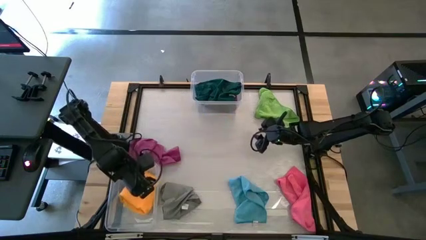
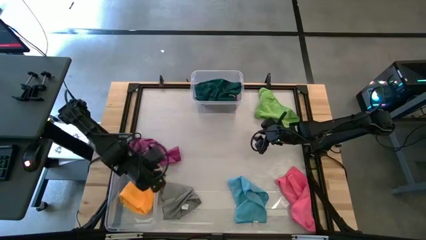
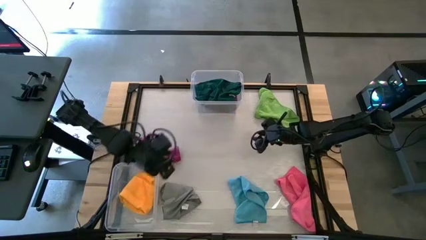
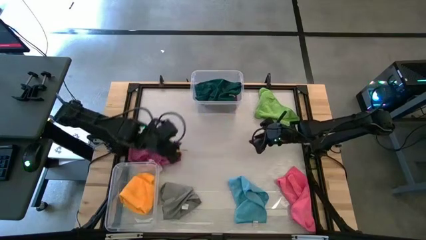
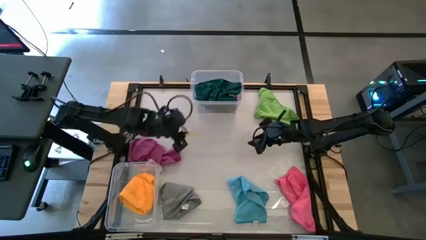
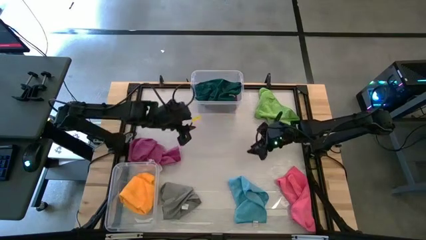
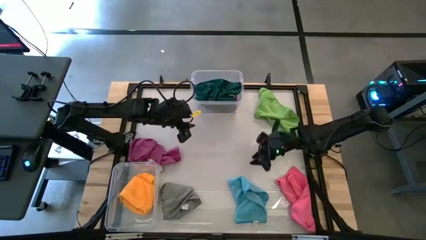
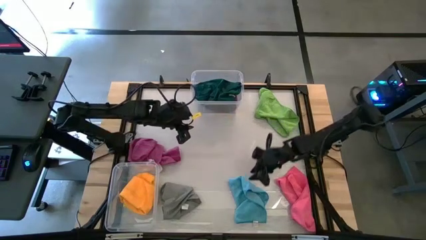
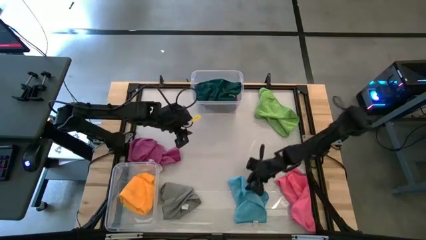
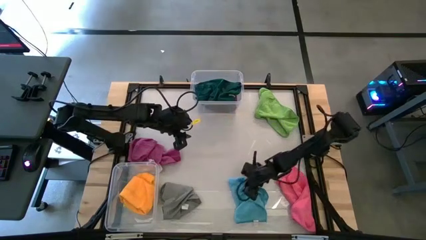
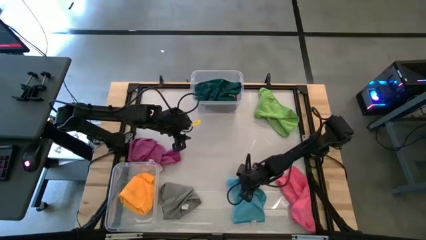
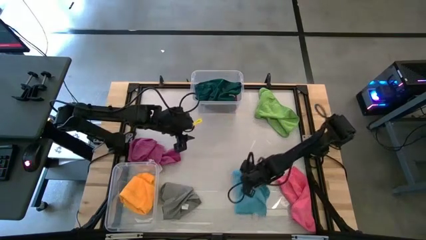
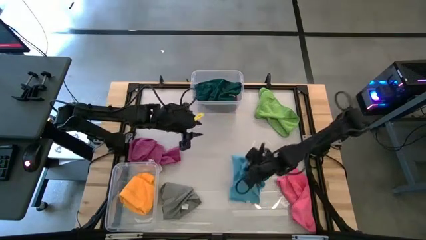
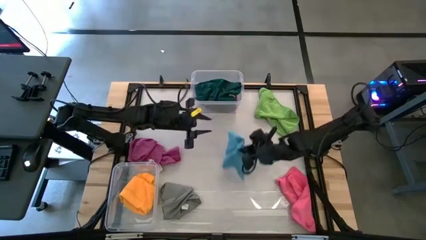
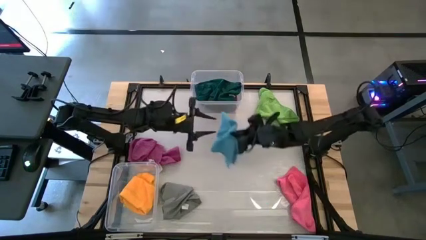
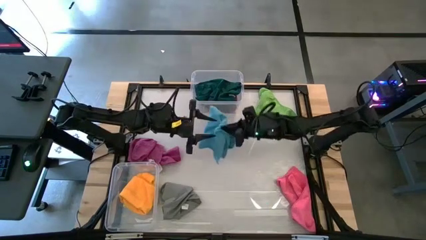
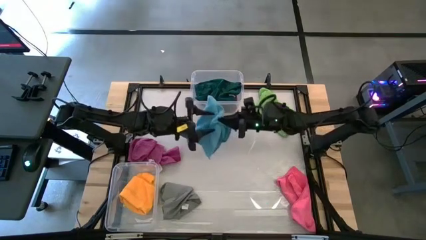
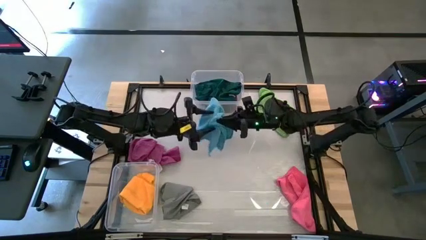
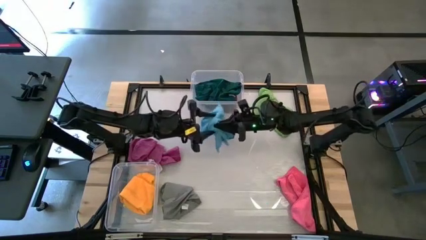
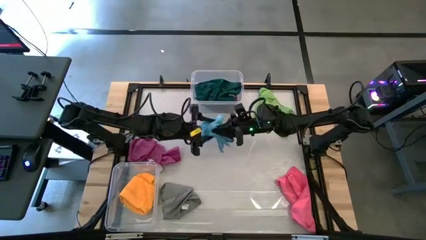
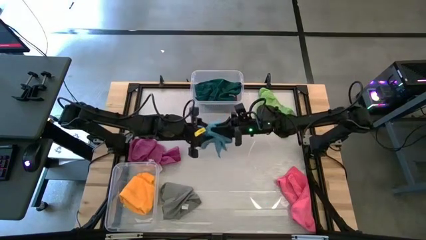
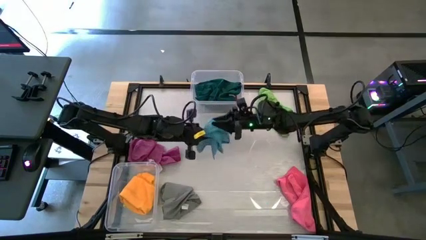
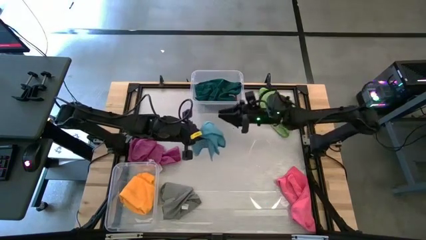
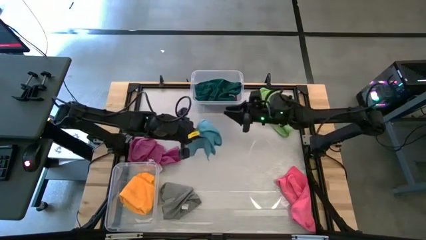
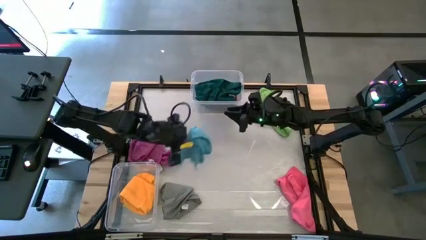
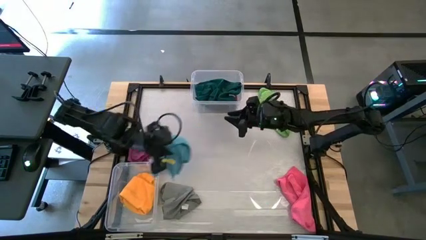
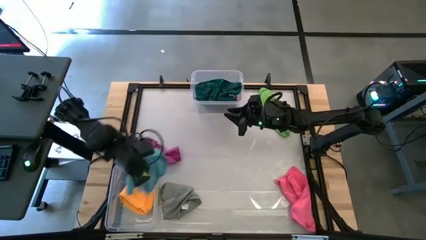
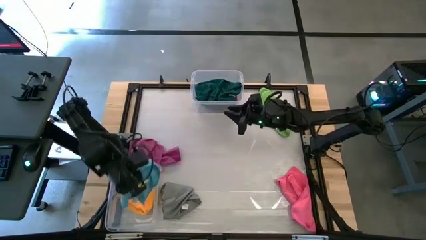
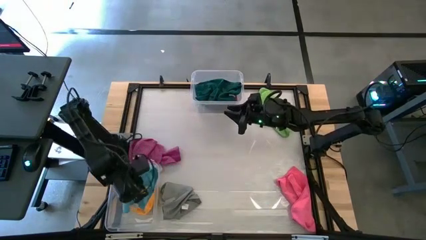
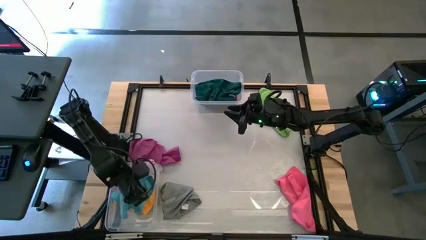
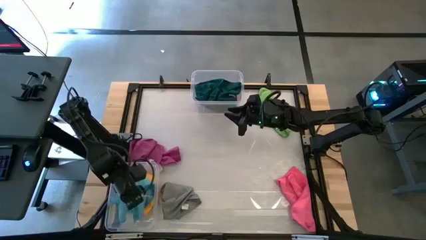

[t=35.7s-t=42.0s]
Task: Sort towels by color in basket
Put the blue microfiber towel into the bottom transparent bin

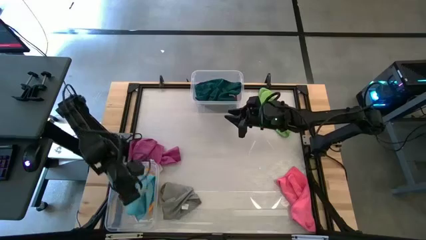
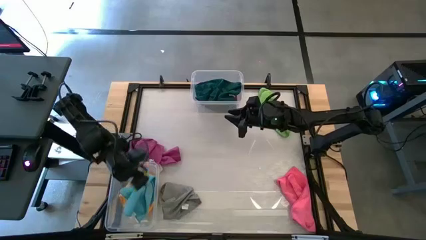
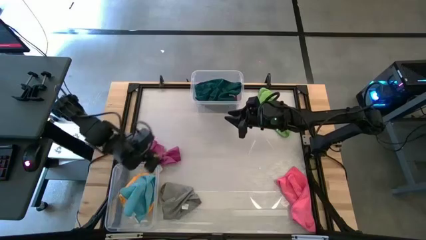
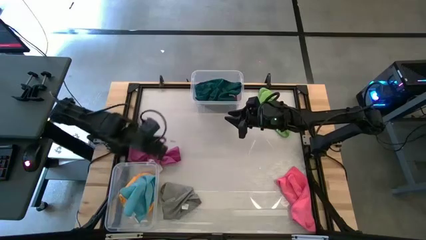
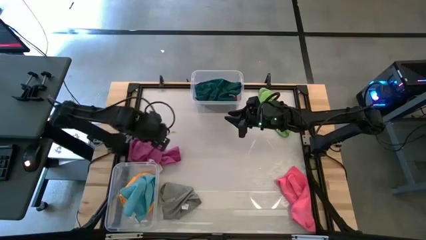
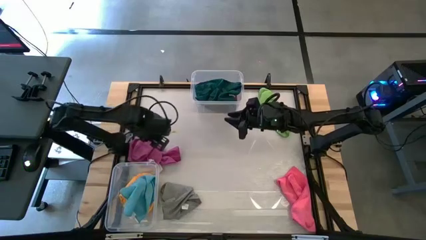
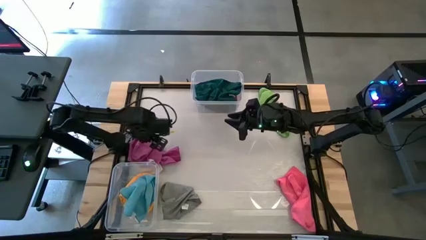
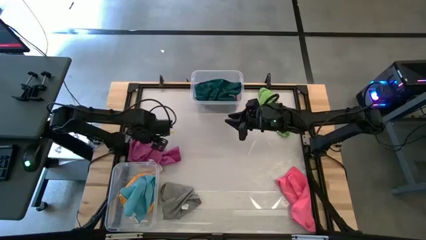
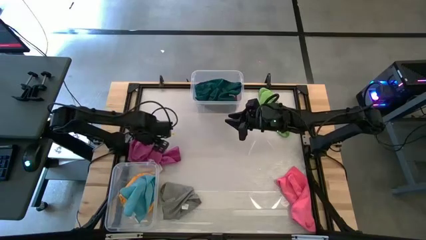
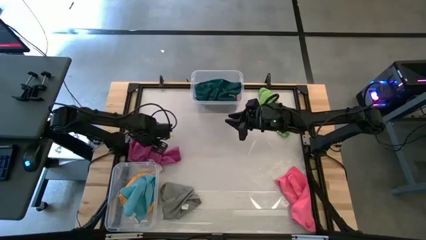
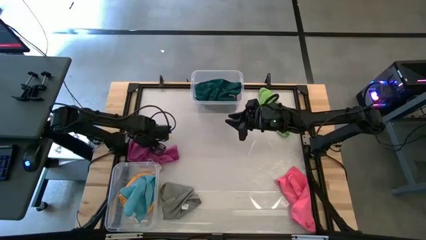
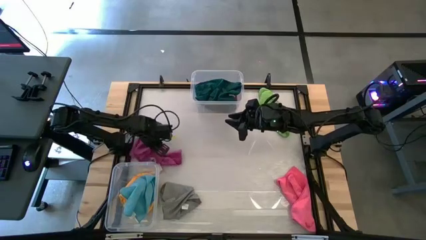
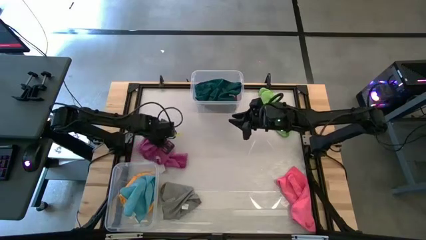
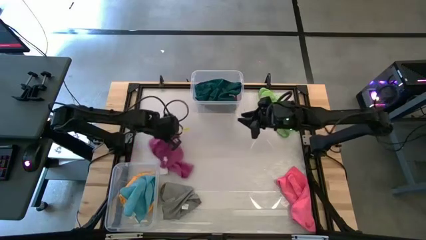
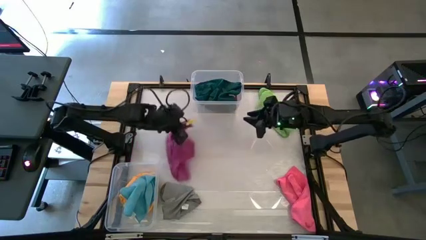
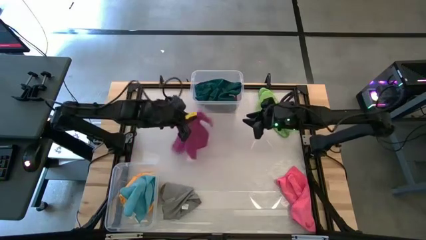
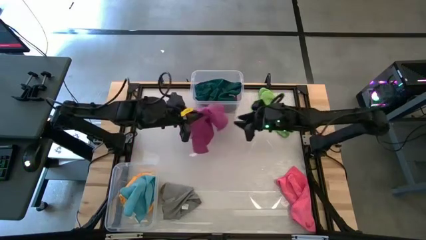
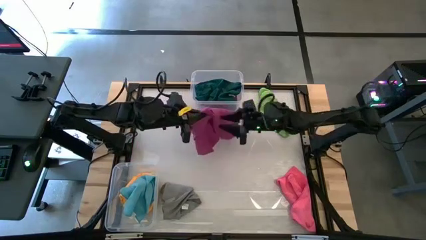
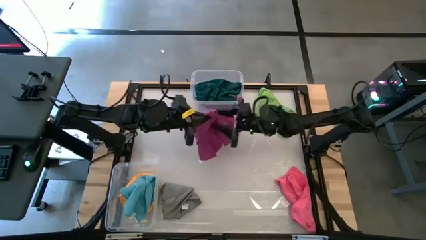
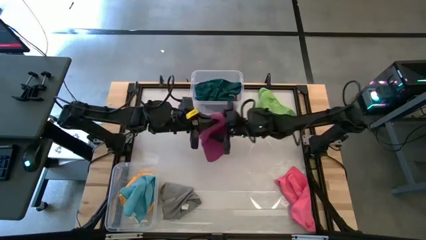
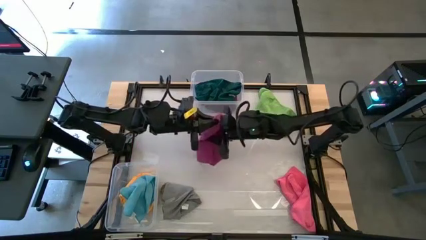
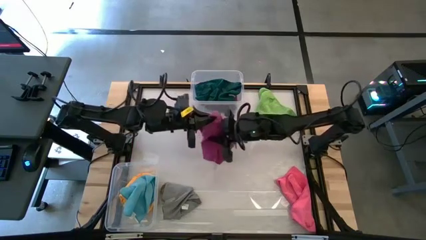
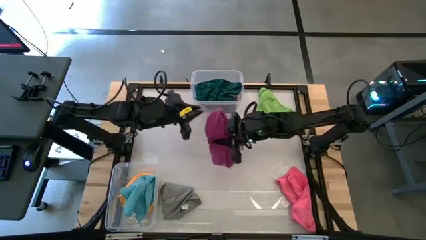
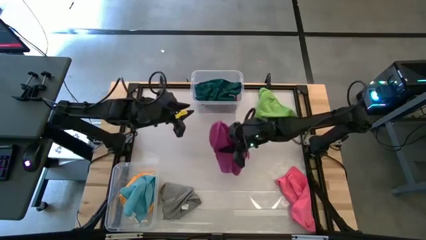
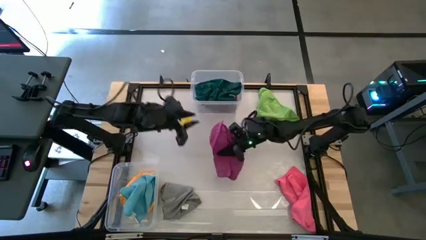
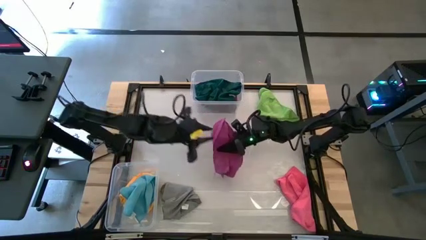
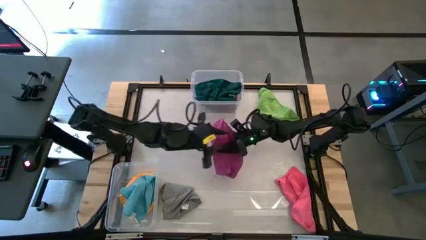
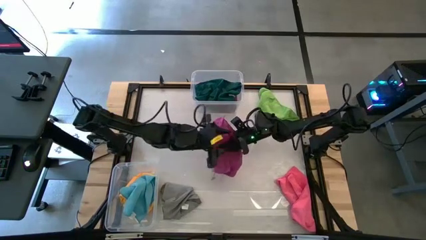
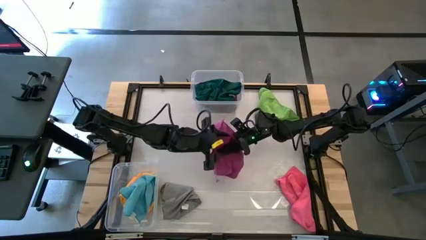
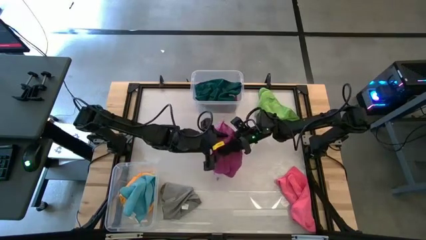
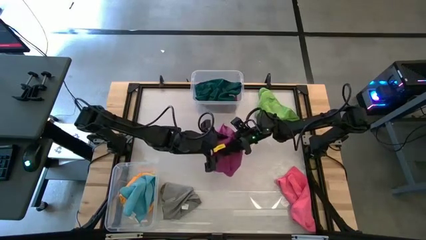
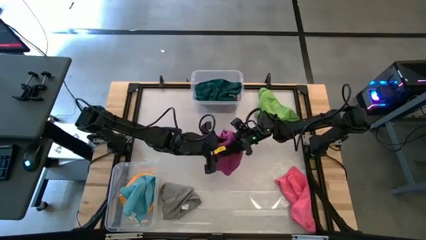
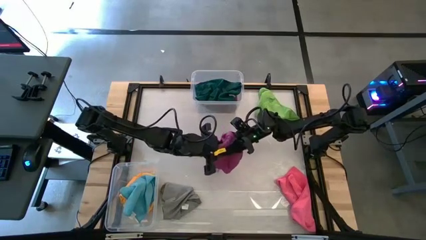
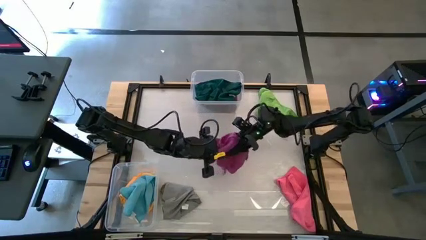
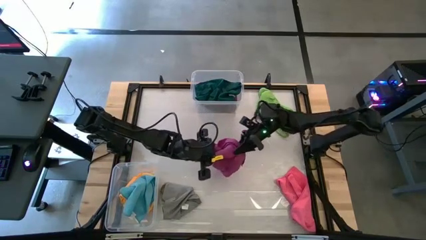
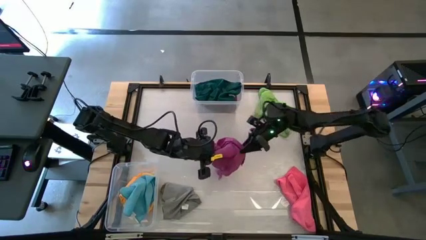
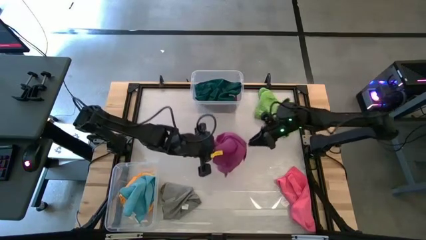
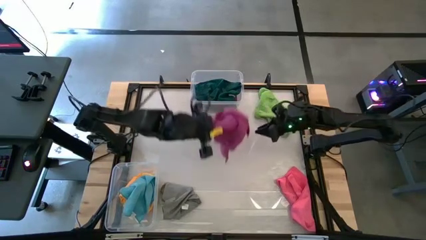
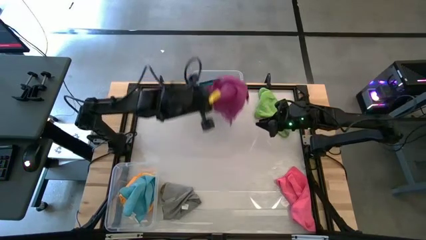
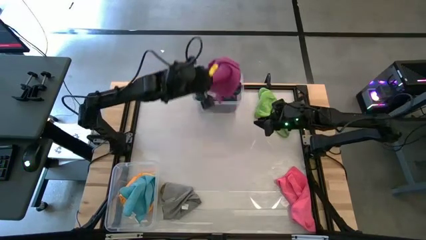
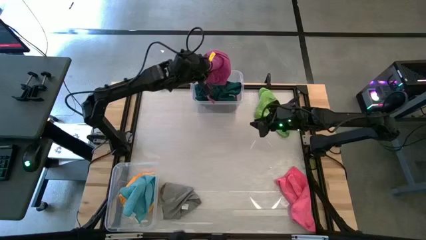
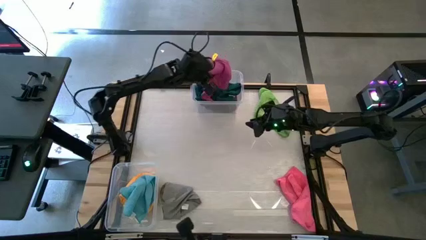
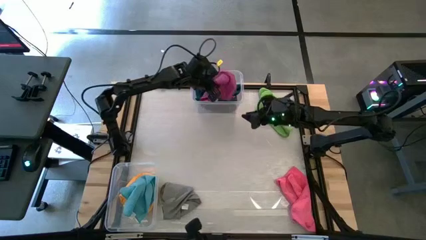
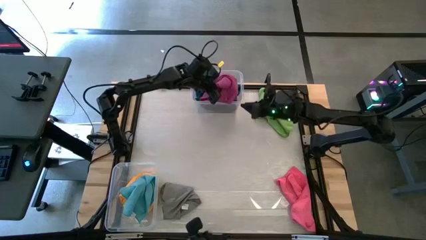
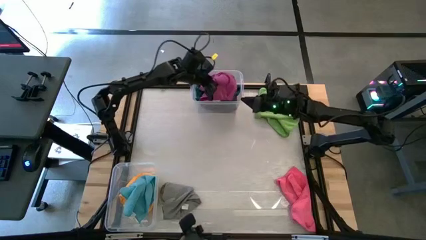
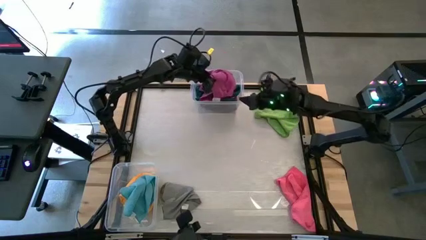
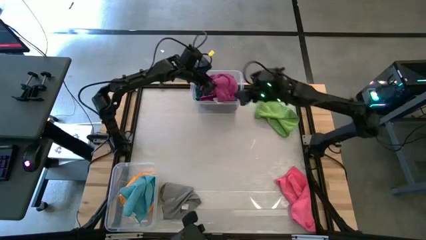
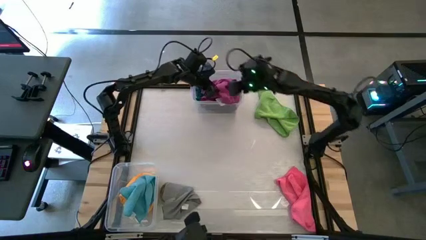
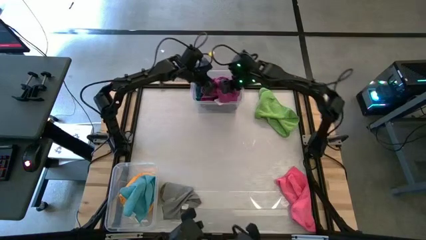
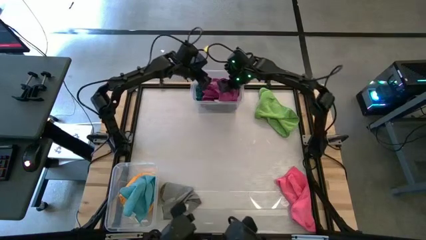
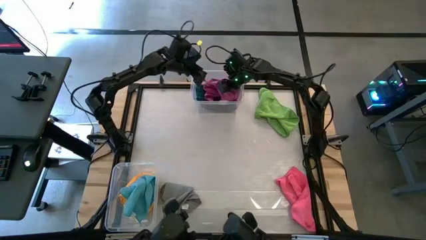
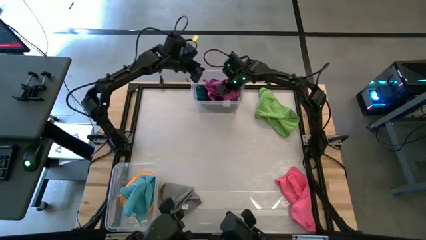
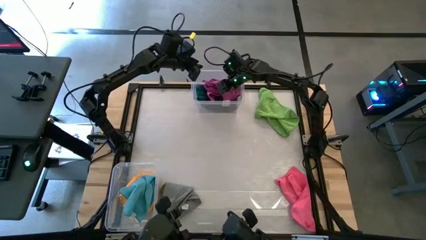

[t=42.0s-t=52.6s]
Put the pink kitchen towel into the top transparent bin
